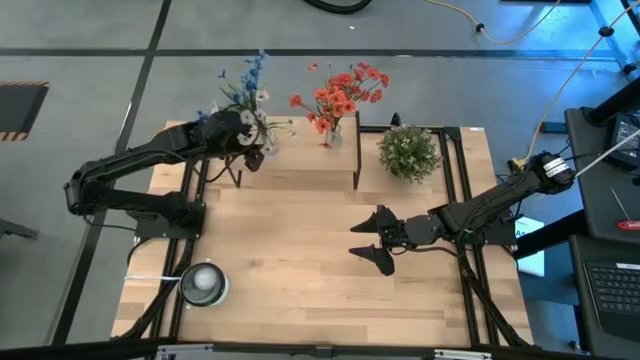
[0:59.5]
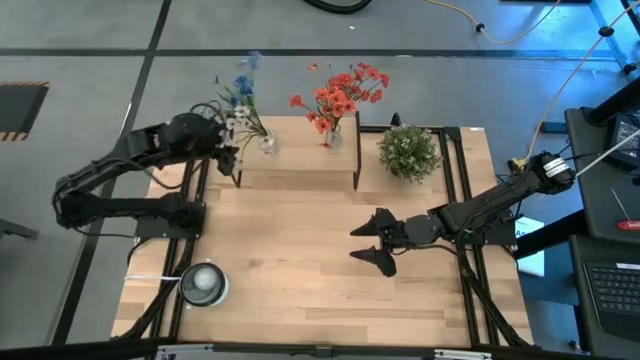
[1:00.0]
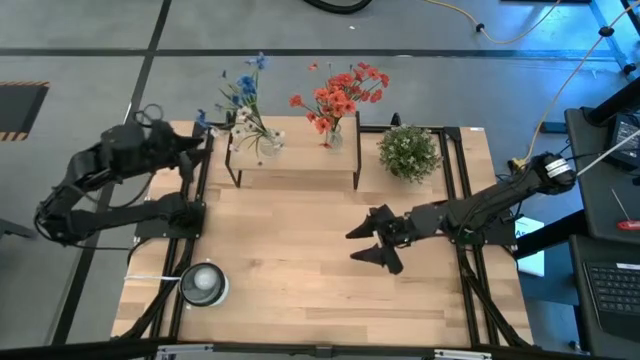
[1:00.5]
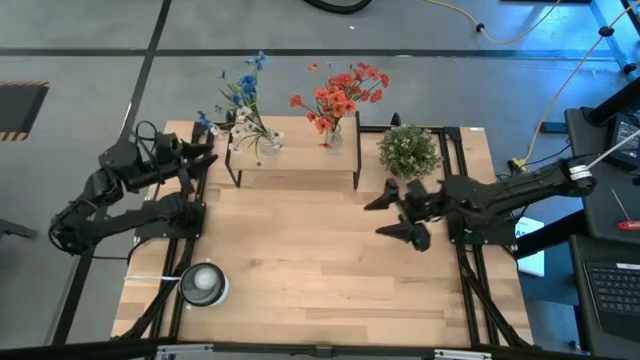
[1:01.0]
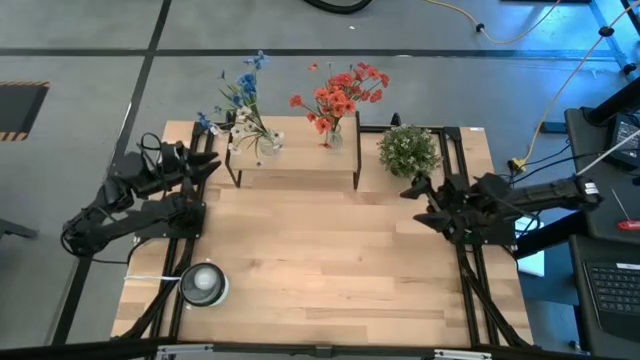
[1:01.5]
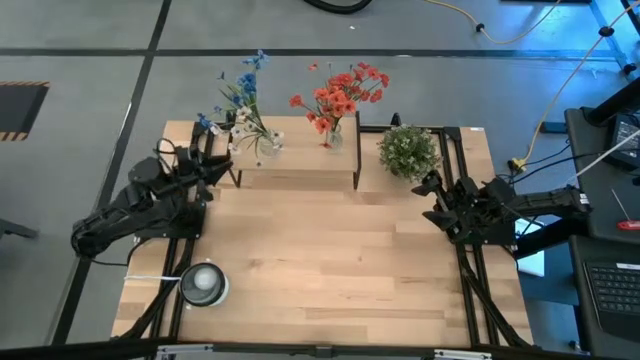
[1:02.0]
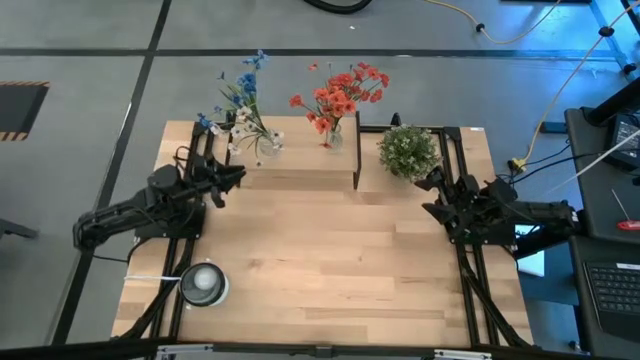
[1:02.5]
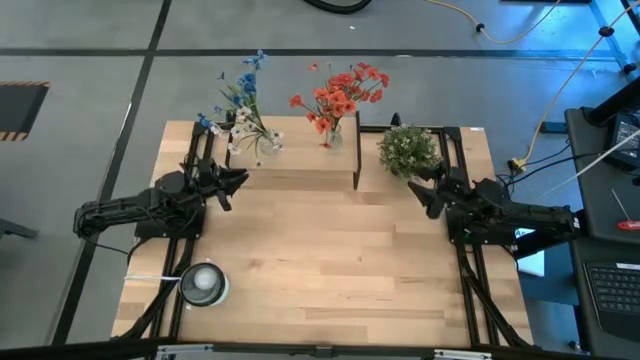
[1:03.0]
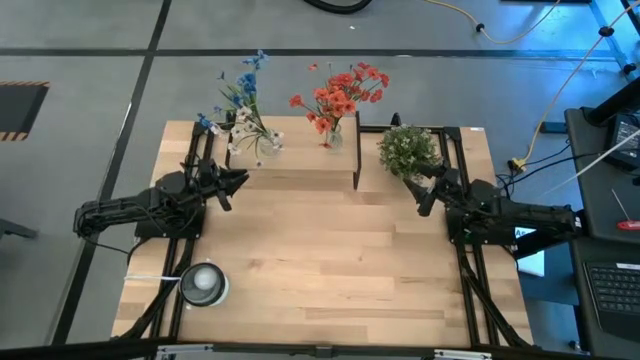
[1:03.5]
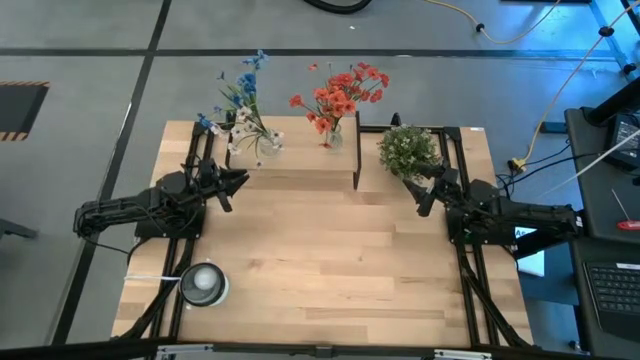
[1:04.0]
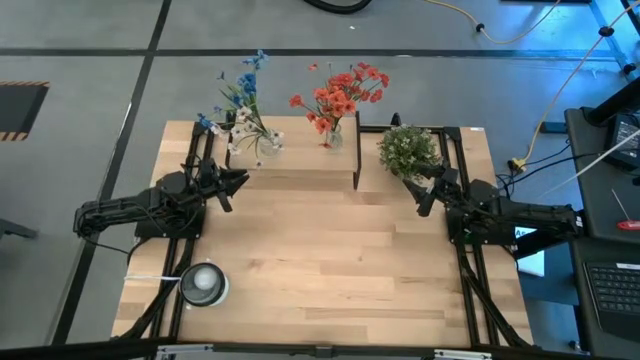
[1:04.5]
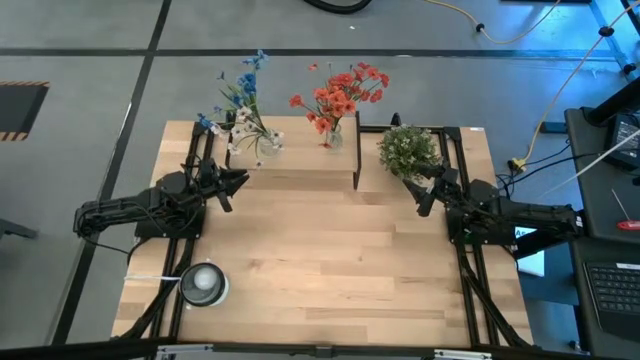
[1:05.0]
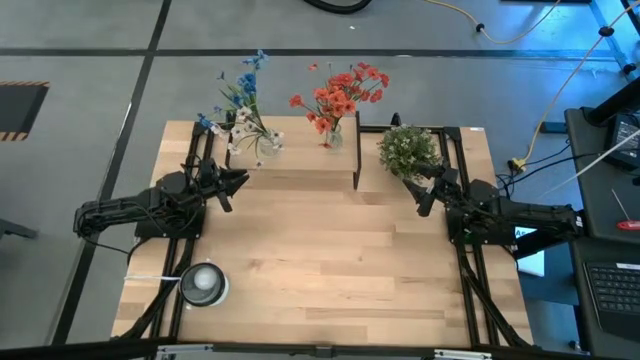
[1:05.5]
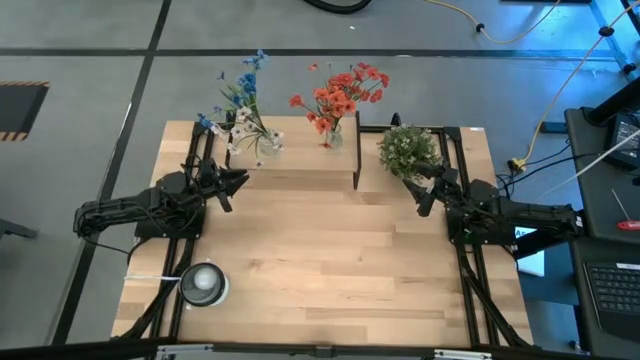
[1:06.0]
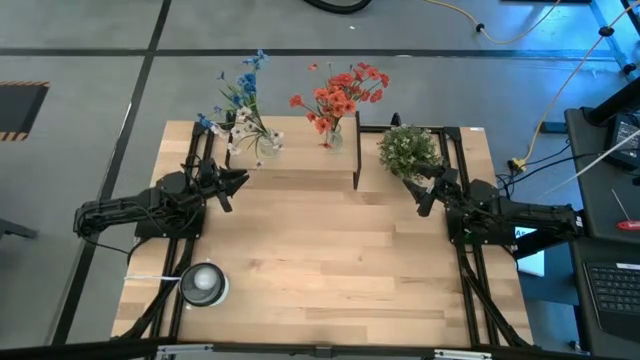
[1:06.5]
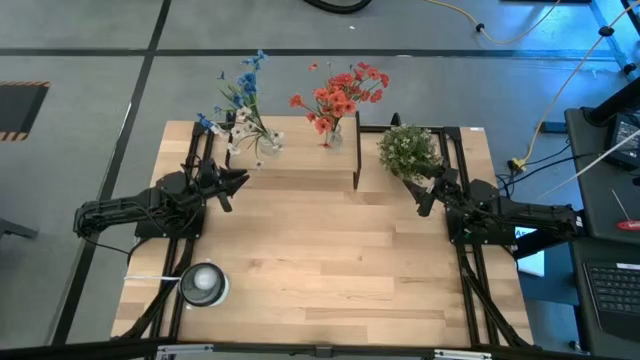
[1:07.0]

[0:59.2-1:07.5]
Task: Pick and place flowers into a vace then onto a shelf
Return to Home Position

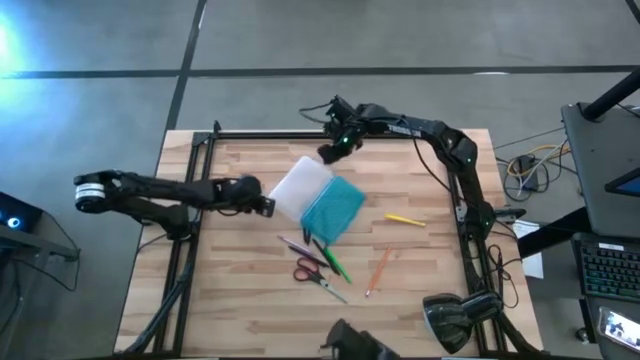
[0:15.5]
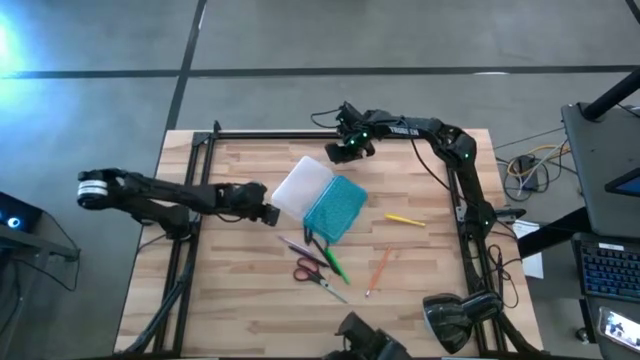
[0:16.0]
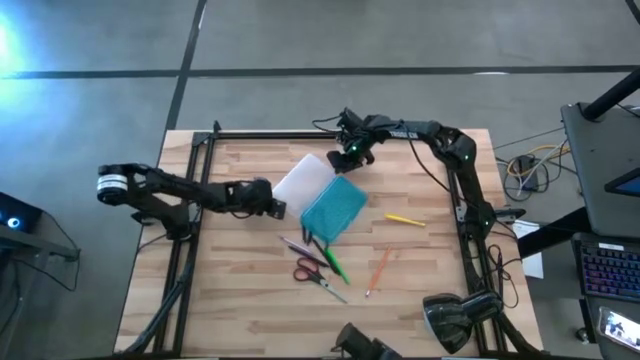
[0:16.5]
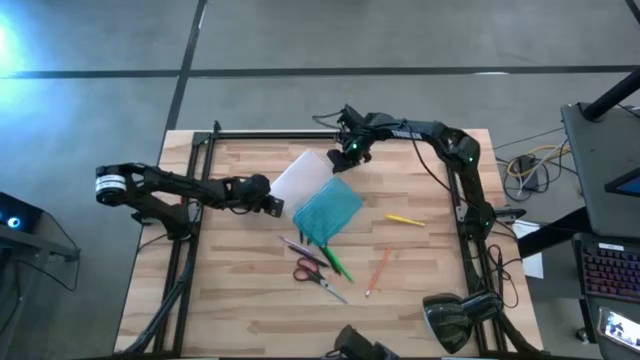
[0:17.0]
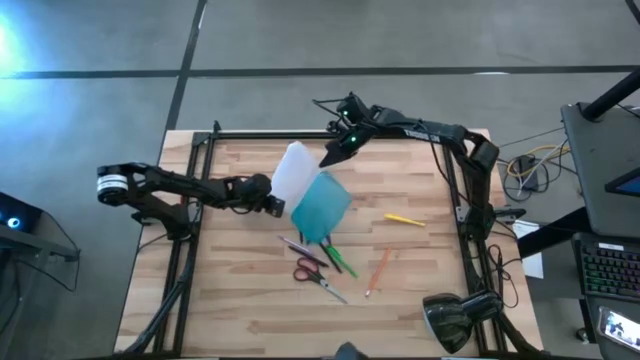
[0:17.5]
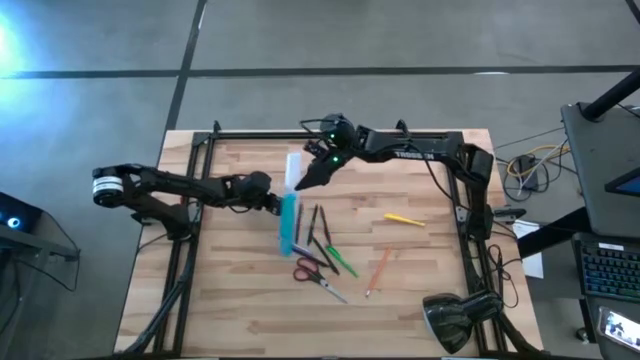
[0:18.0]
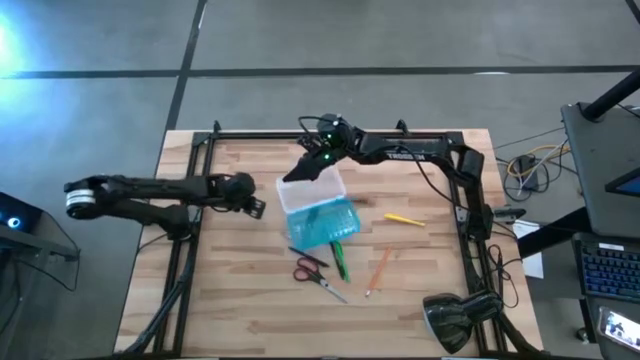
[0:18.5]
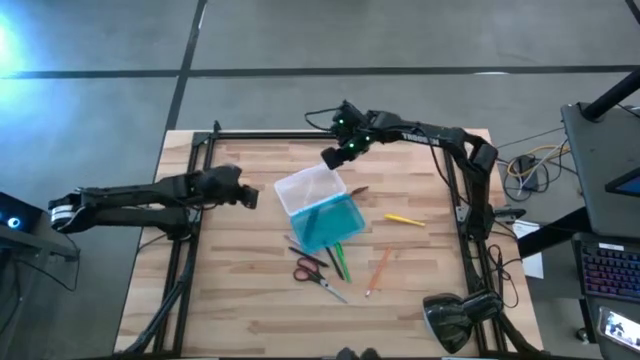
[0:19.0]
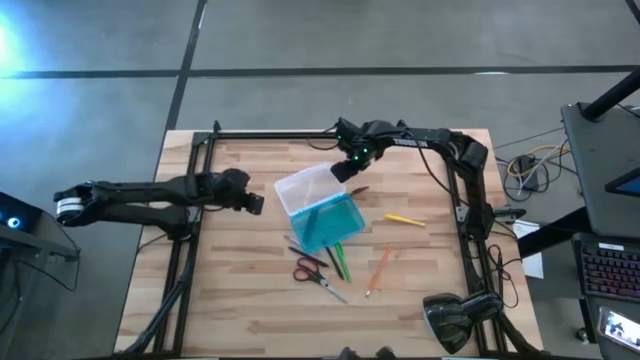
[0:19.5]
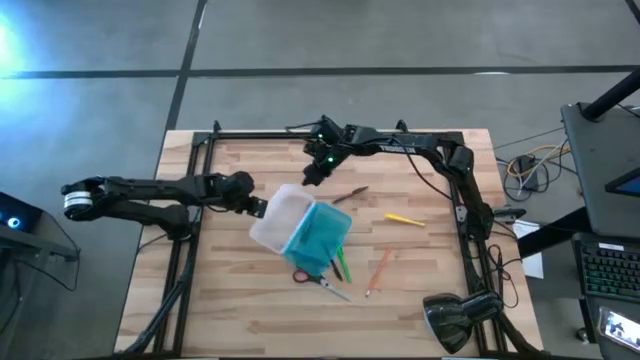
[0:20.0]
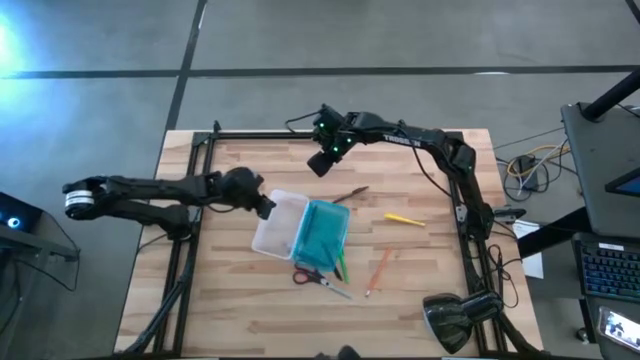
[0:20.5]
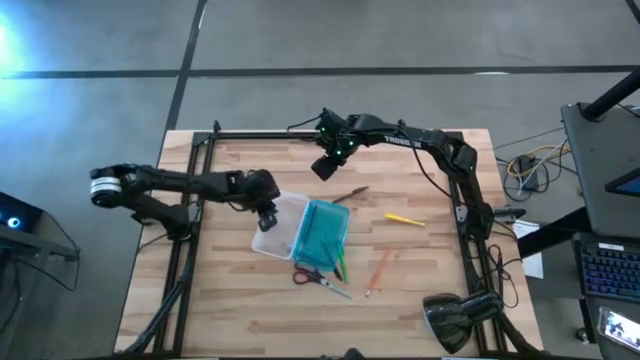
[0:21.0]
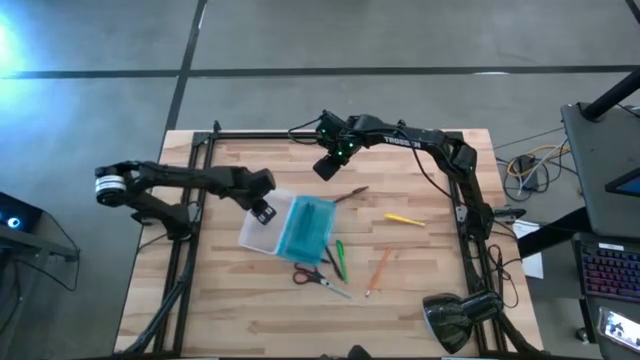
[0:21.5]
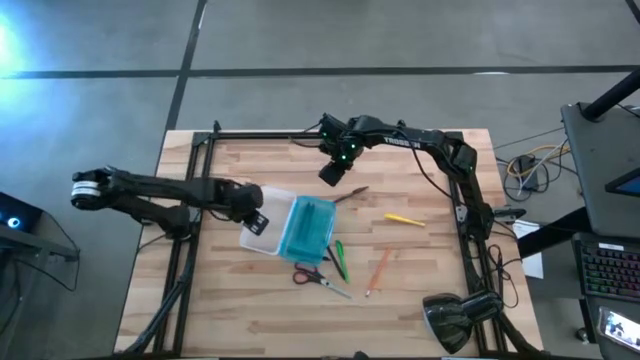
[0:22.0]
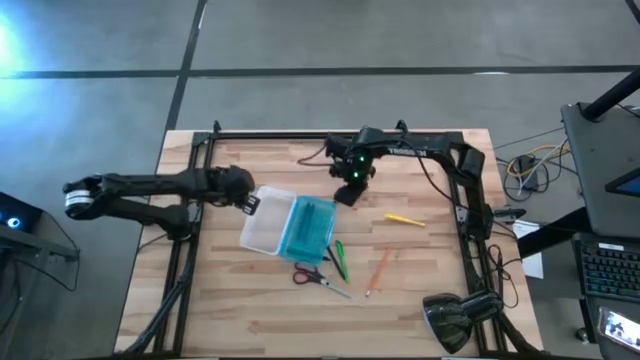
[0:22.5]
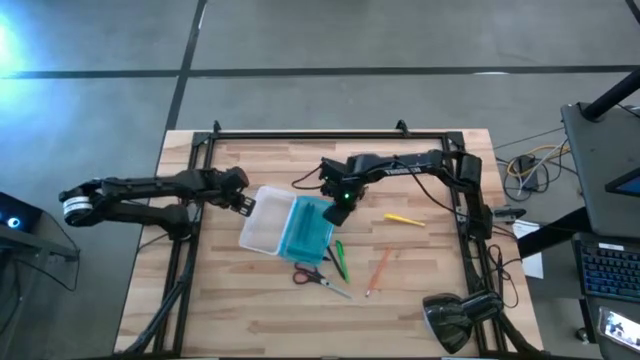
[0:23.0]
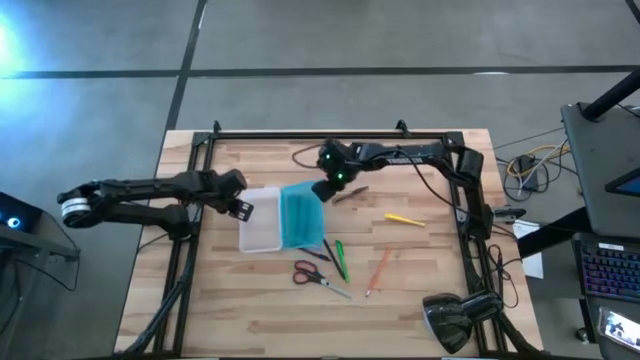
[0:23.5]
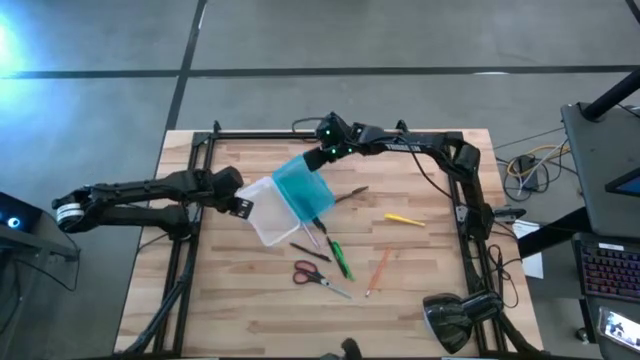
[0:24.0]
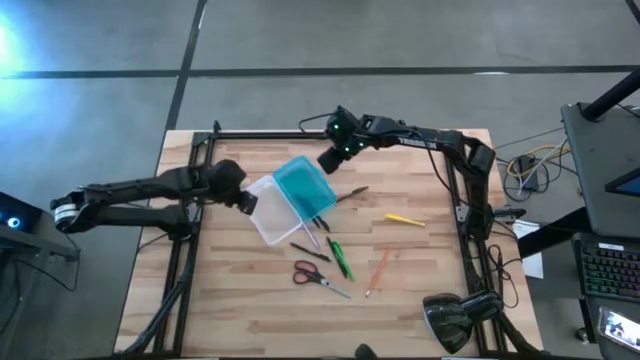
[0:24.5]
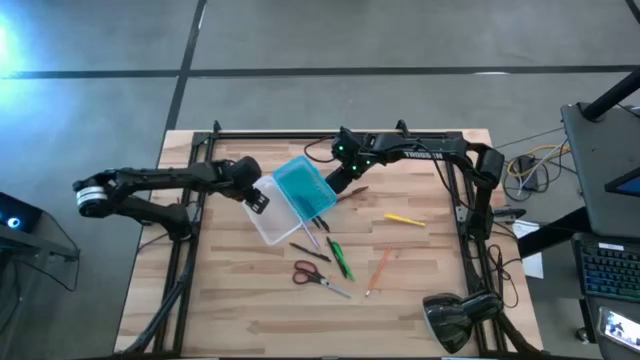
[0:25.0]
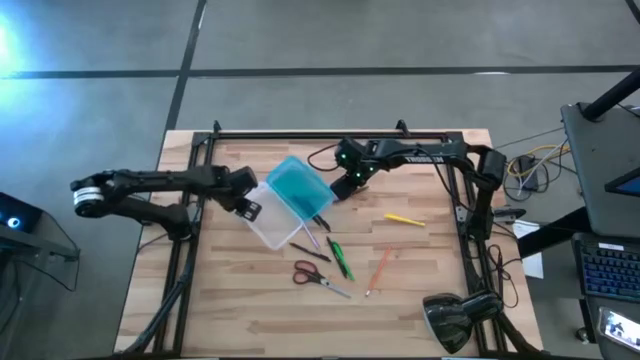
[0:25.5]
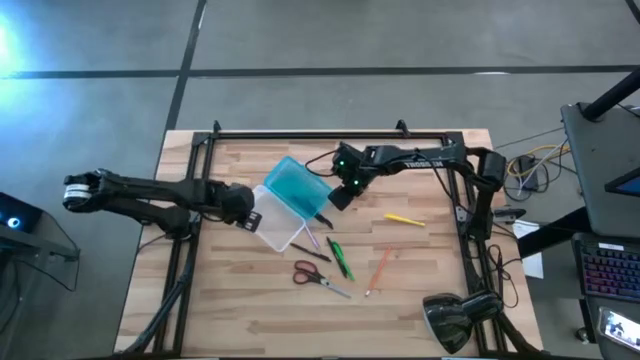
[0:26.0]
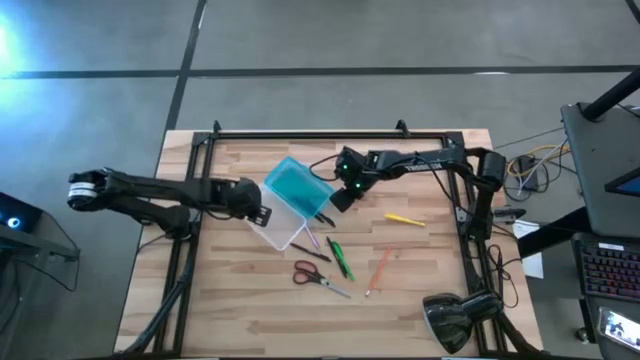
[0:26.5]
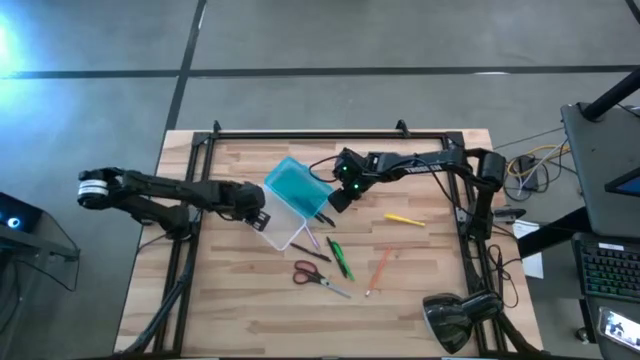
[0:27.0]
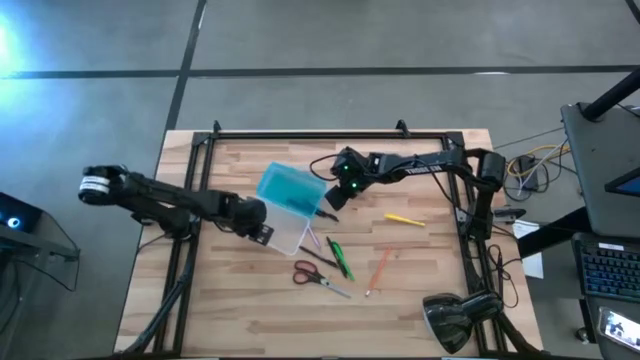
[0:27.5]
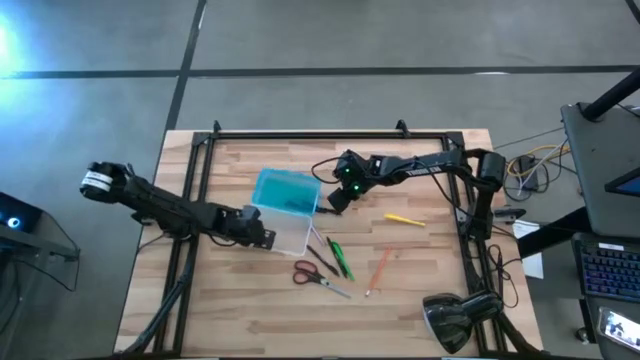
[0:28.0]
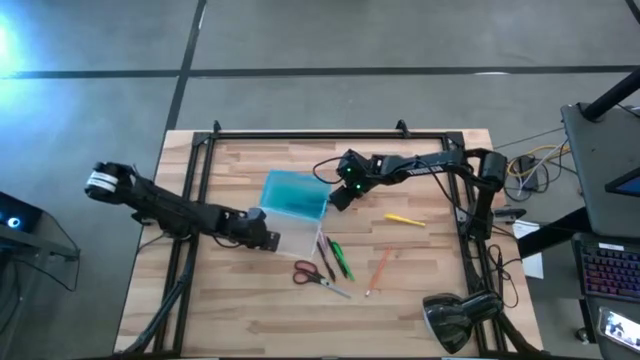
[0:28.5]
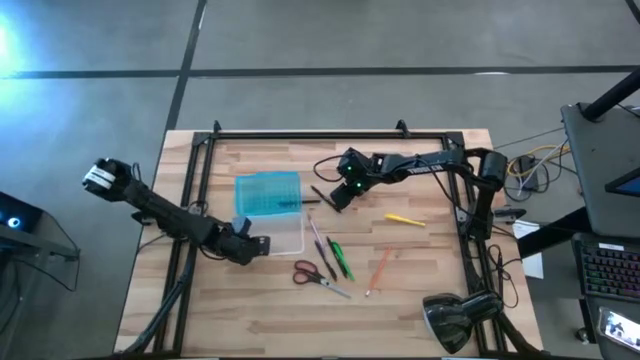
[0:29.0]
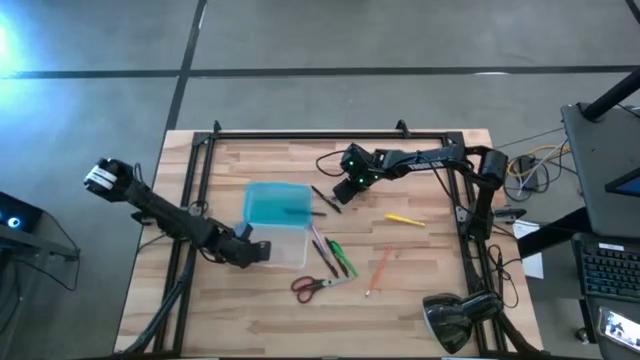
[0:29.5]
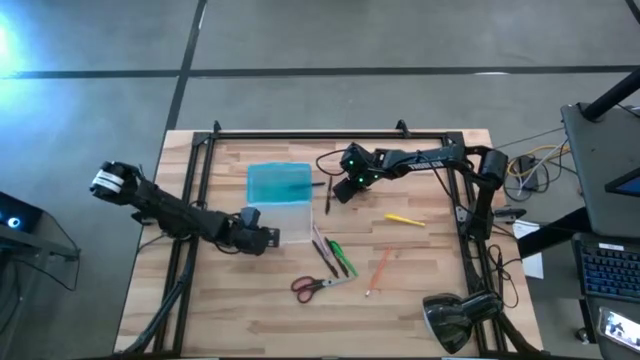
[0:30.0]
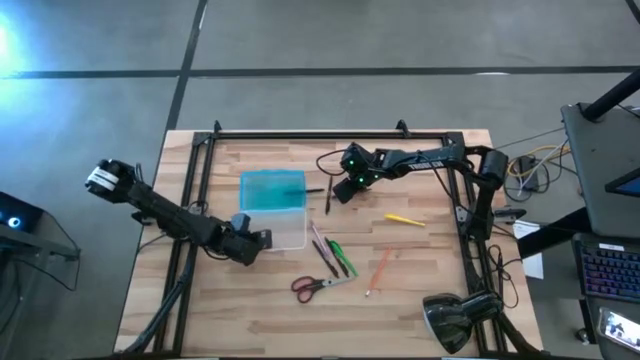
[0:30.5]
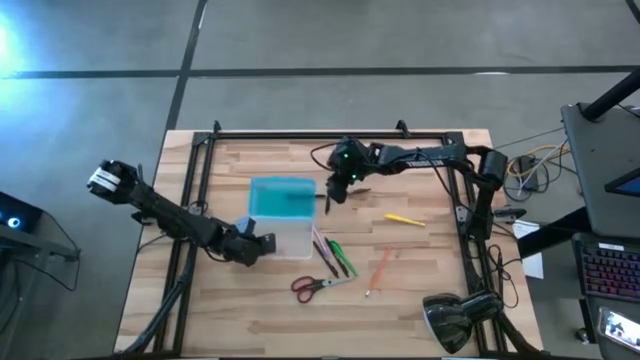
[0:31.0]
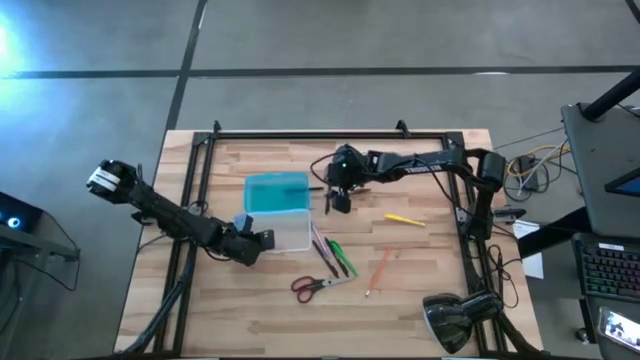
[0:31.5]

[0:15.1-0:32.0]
Task: Pick & place school supplies into a supply box
Prepare the blue supply box
